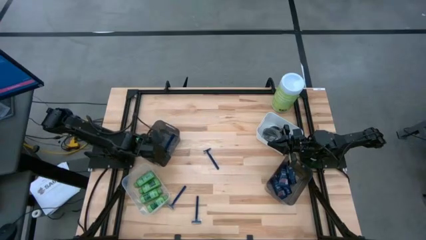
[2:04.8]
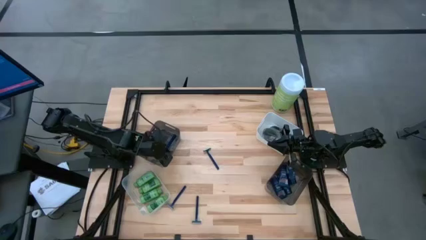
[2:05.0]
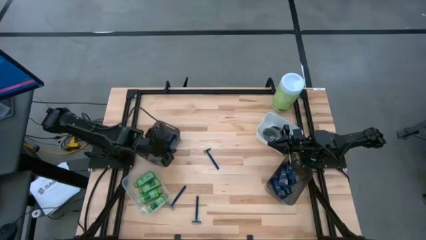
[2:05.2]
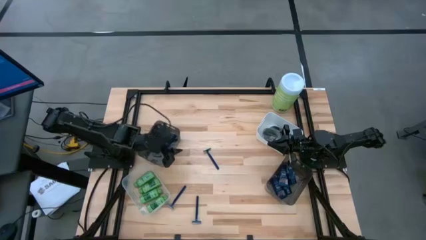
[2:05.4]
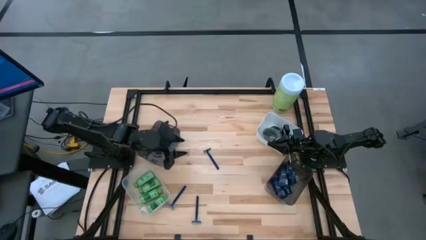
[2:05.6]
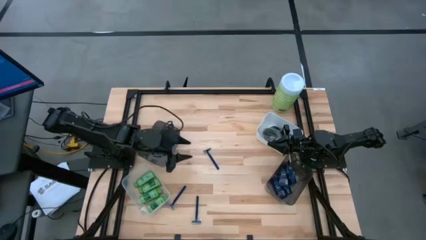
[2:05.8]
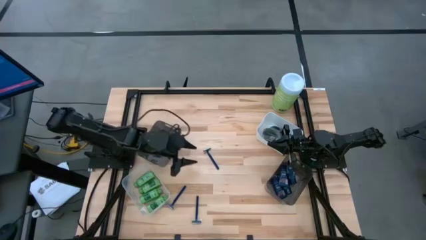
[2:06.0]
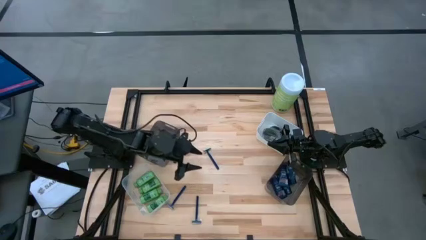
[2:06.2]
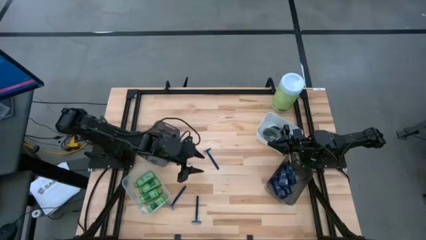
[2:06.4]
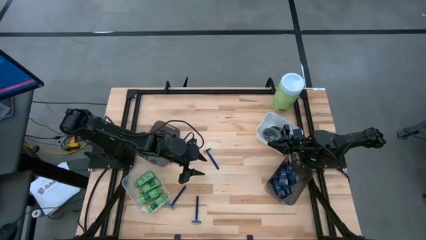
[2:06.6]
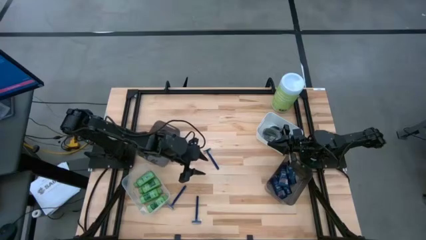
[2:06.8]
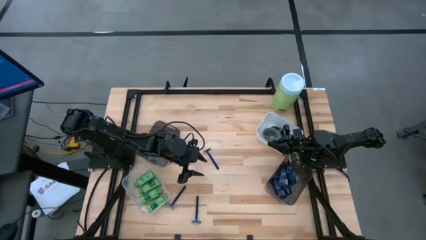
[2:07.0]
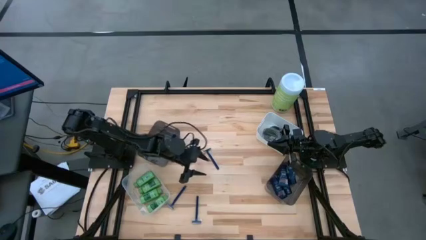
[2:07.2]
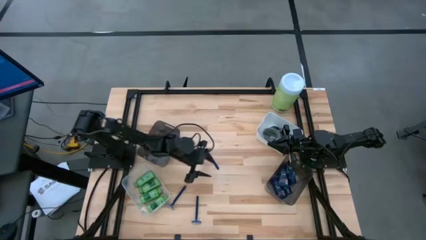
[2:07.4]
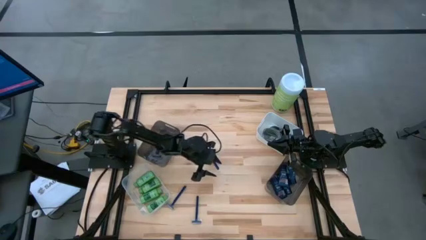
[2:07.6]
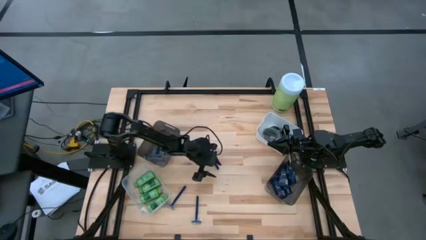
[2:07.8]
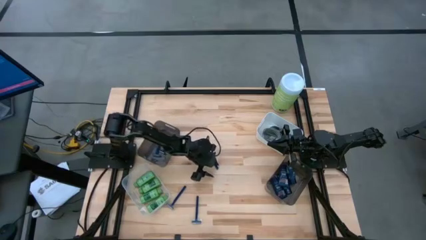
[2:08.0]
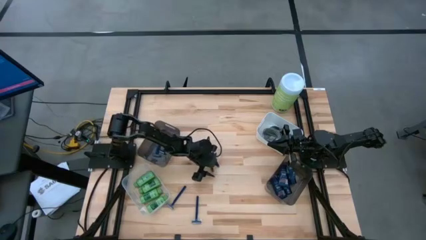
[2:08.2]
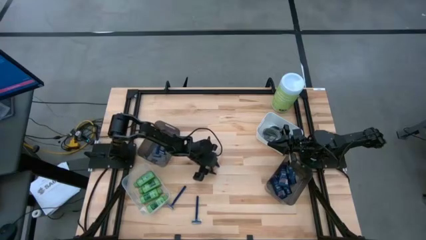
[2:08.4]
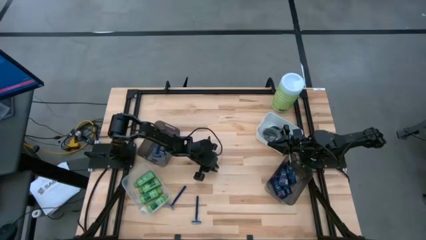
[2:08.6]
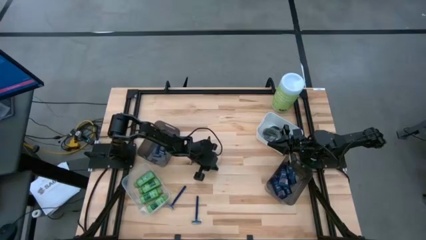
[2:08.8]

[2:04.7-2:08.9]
Task: Pick & Place Travel size toiletries
Put the blue razor into the left black bin

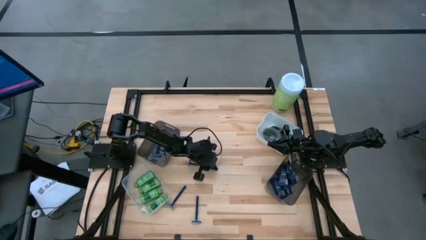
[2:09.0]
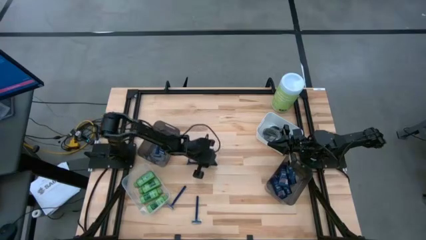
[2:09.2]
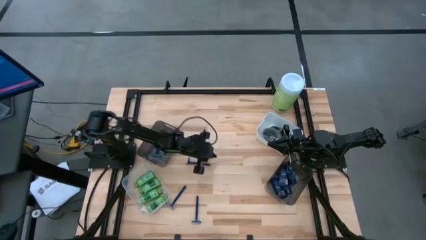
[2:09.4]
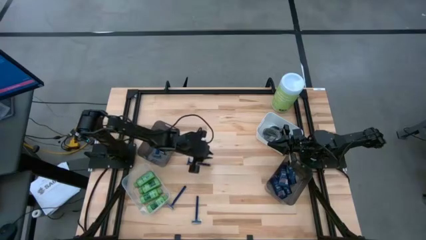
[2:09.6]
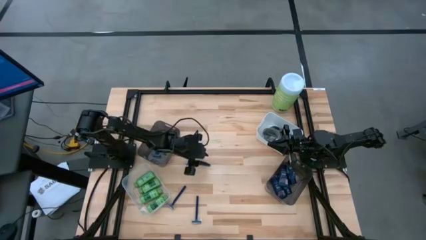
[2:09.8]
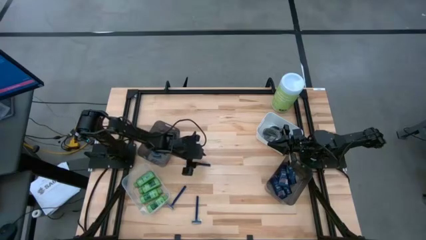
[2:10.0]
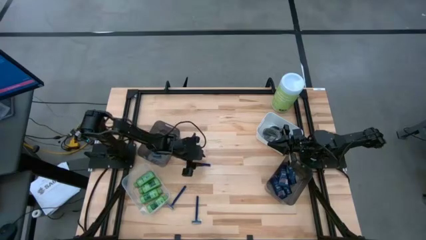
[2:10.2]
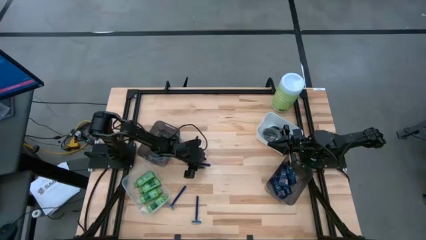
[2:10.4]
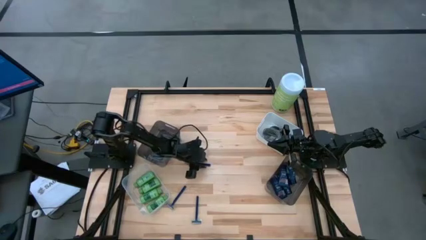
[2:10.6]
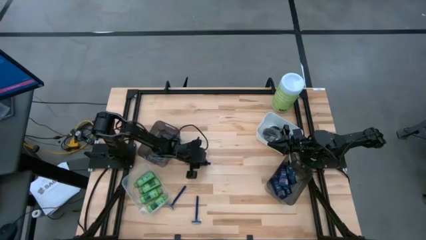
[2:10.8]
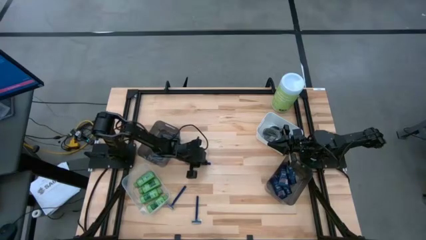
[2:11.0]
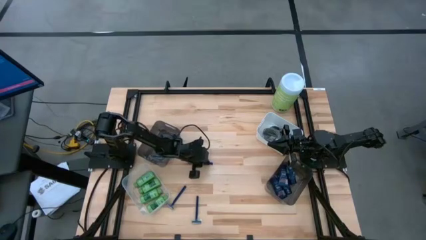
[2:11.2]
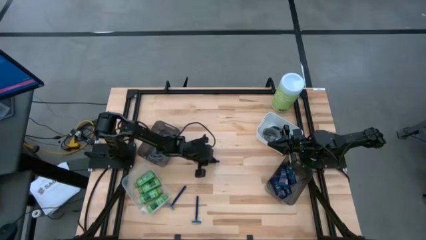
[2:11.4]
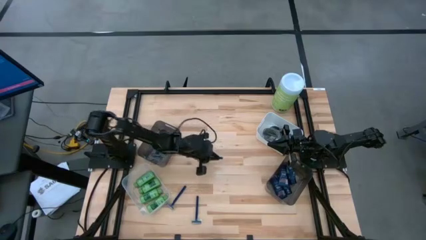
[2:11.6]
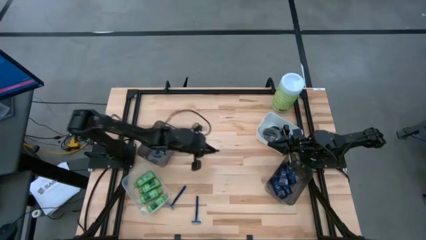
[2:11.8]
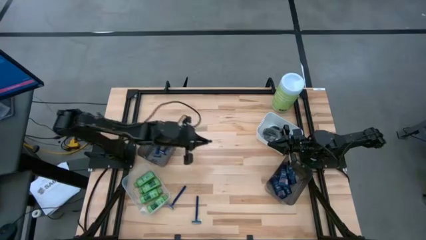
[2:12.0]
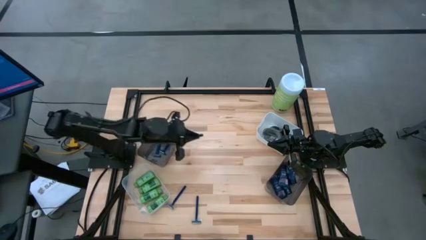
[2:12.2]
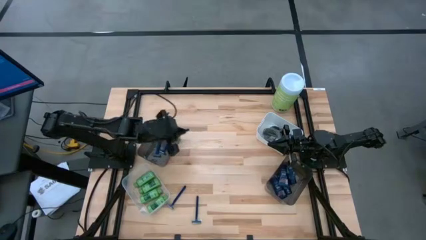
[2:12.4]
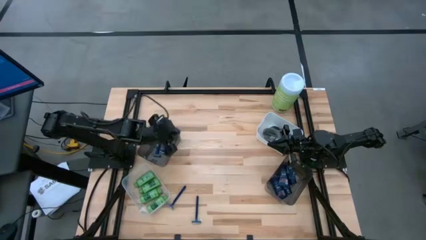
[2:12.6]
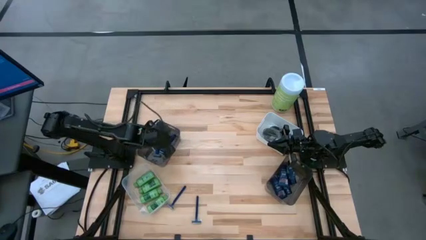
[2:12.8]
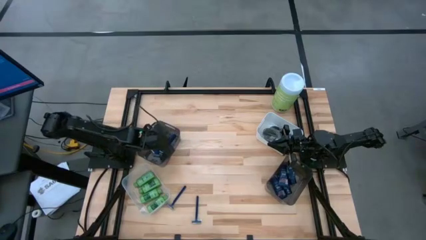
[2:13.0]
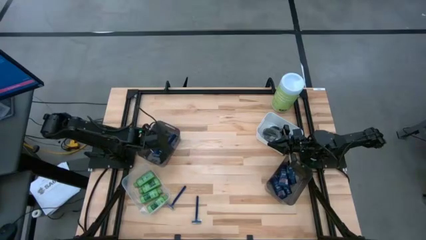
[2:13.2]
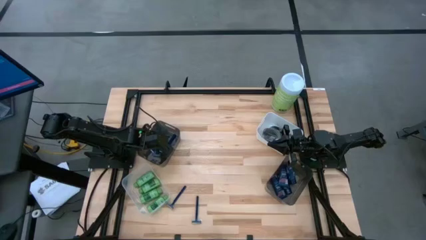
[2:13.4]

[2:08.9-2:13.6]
Put the blue razor into the left black bin

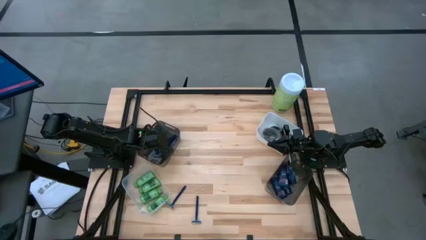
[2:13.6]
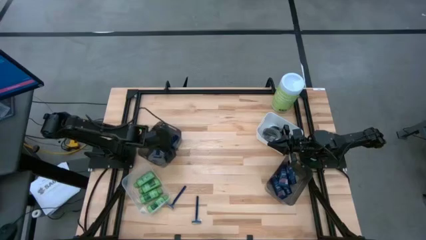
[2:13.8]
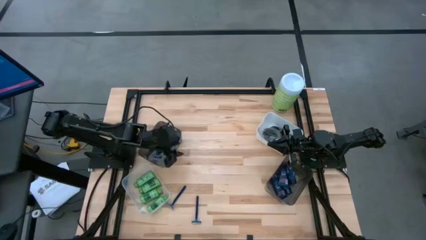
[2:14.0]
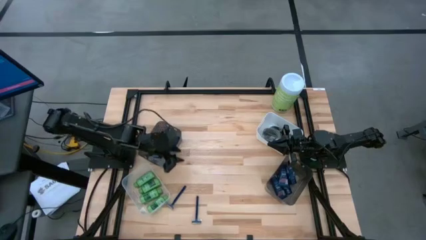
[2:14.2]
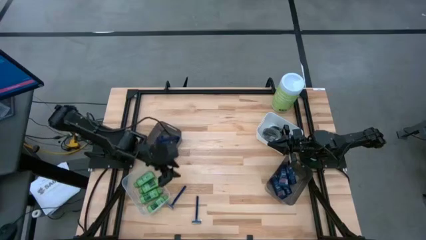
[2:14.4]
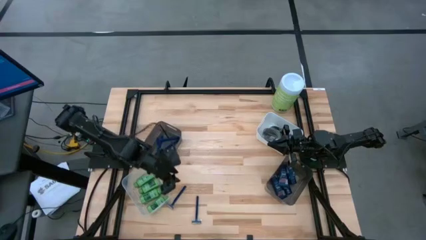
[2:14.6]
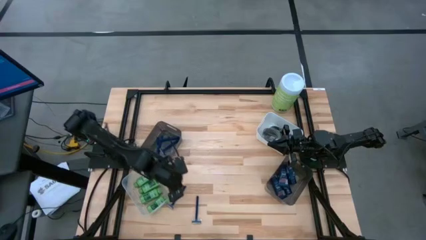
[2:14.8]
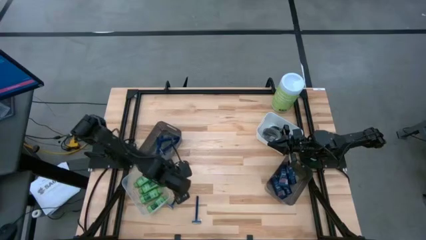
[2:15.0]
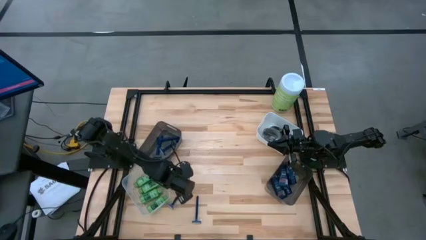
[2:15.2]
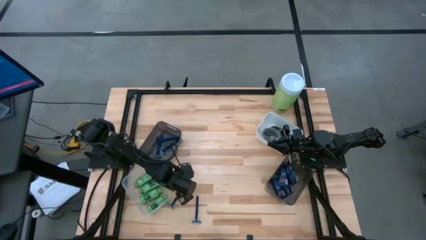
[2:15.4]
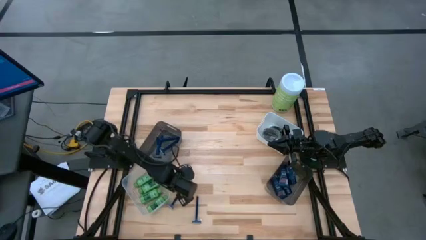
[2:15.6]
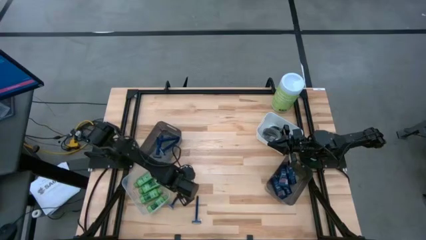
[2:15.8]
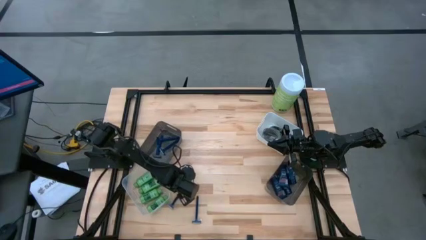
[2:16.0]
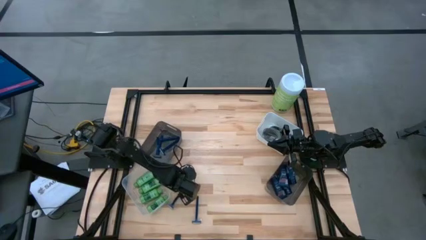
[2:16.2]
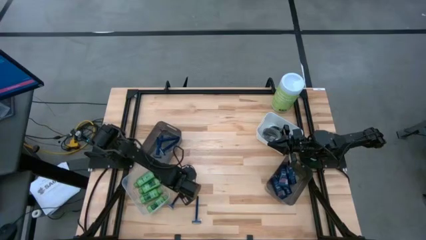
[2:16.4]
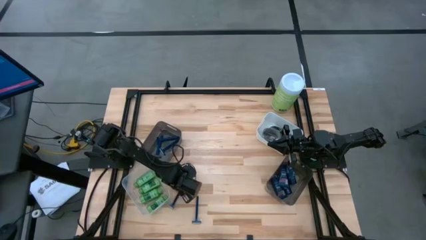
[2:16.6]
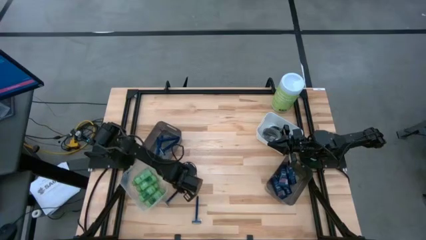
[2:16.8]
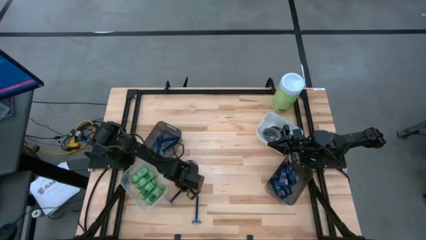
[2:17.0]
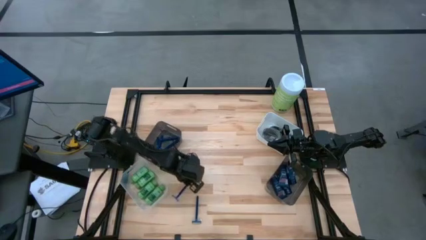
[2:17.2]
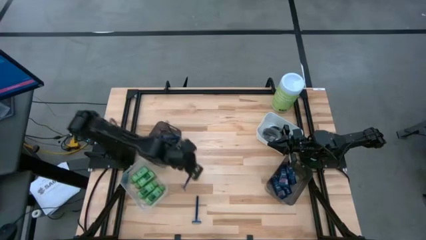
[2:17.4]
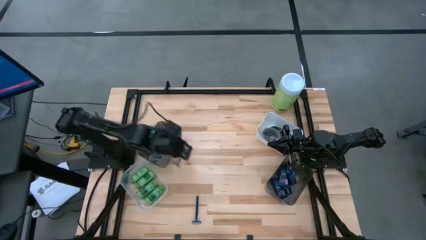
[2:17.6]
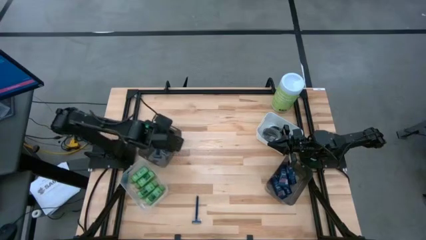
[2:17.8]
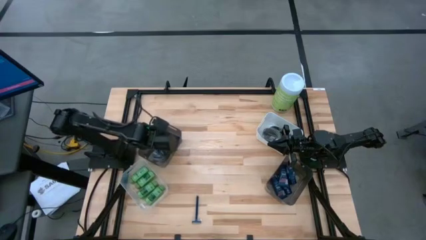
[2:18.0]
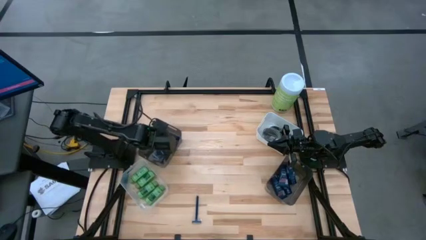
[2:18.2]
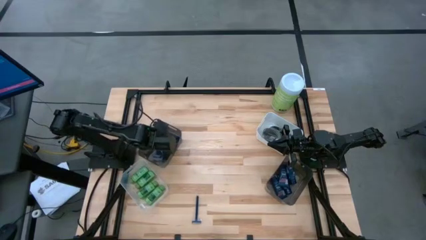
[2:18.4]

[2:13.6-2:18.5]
Put the blue razor into the left black bin

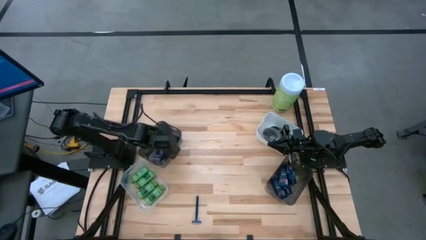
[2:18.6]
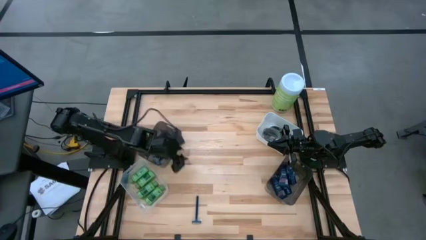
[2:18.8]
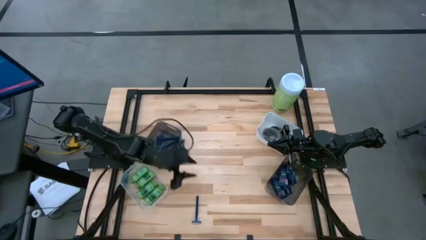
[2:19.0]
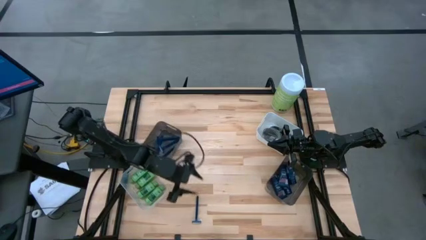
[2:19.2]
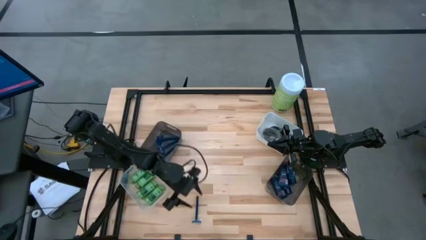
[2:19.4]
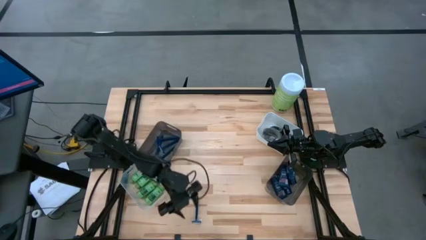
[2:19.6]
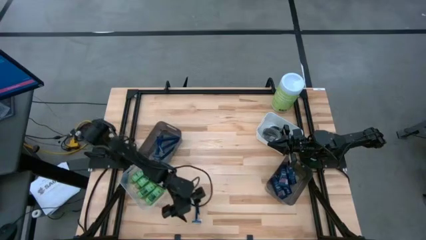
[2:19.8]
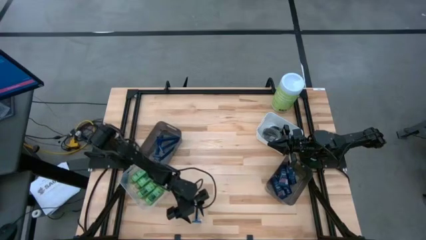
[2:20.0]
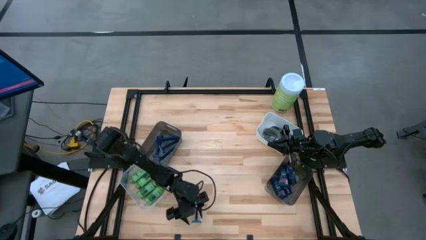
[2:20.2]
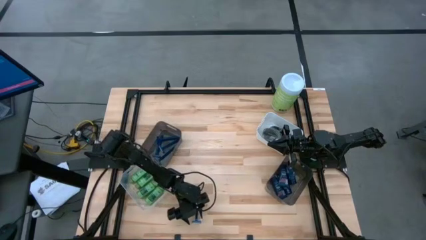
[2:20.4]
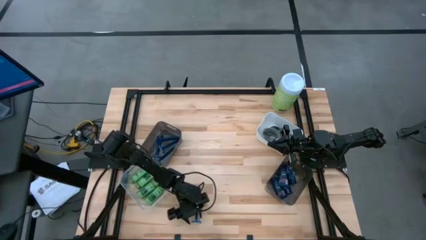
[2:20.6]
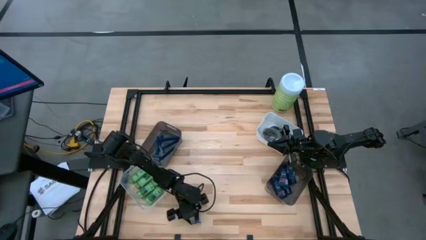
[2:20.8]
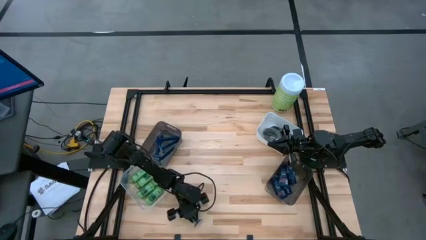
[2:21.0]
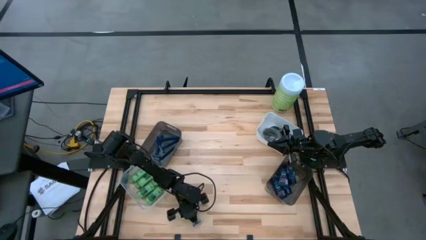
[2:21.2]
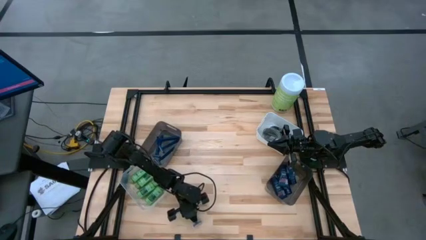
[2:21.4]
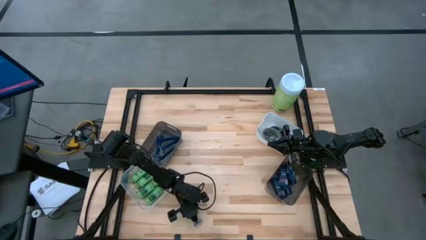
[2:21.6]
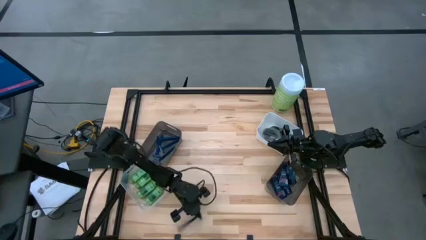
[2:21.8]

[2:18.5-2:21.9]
Put the blue razor into the left black bin
